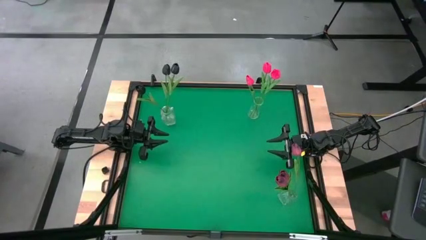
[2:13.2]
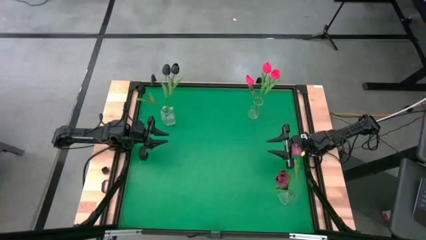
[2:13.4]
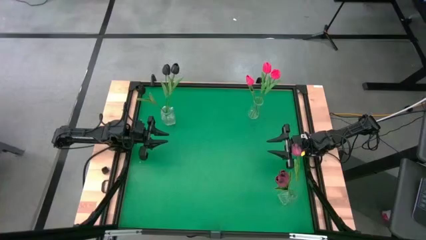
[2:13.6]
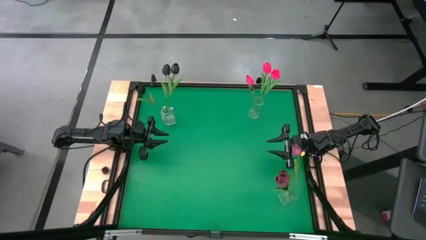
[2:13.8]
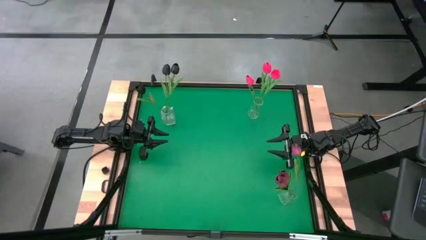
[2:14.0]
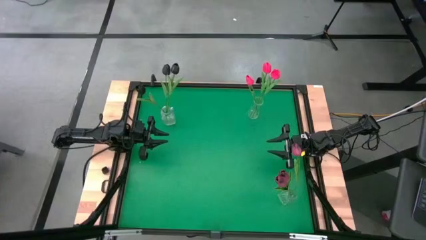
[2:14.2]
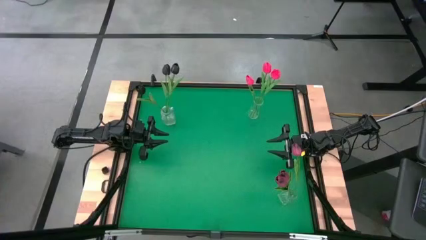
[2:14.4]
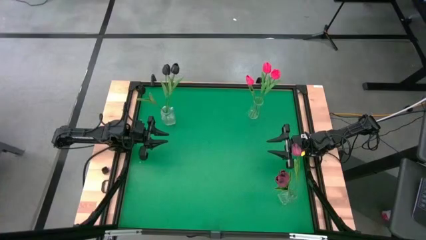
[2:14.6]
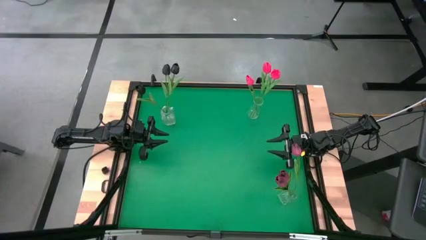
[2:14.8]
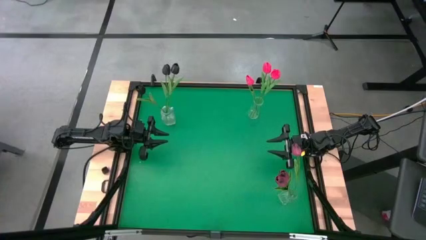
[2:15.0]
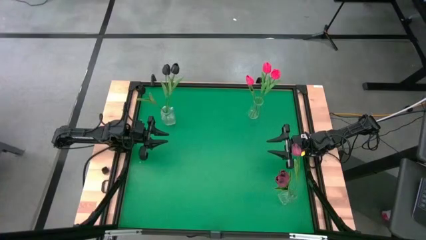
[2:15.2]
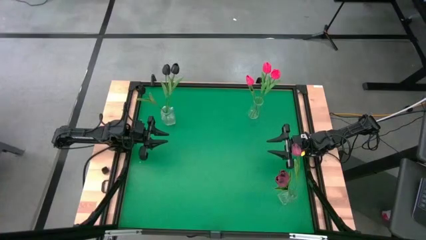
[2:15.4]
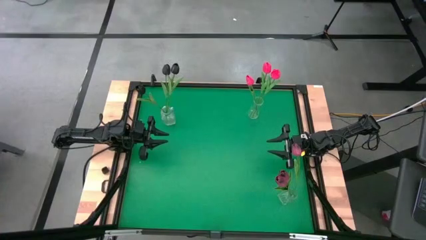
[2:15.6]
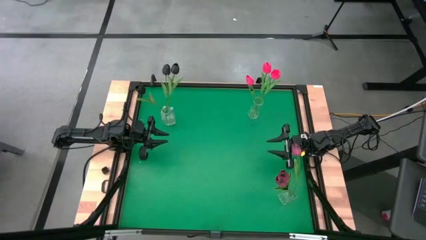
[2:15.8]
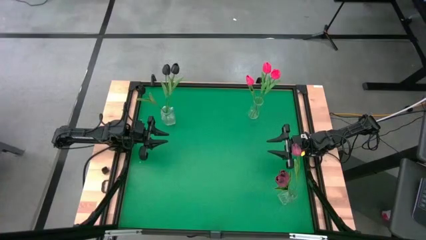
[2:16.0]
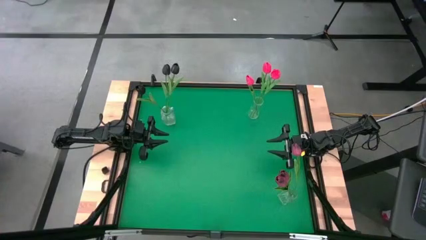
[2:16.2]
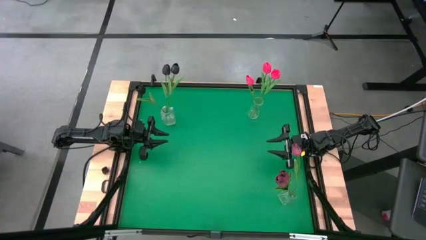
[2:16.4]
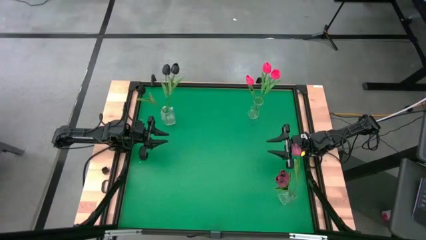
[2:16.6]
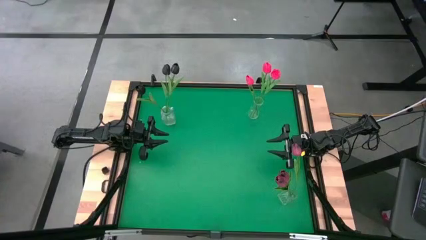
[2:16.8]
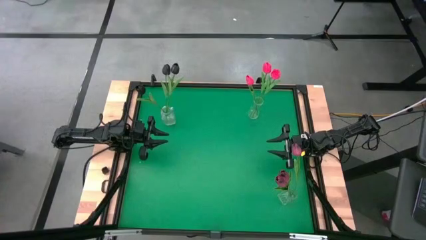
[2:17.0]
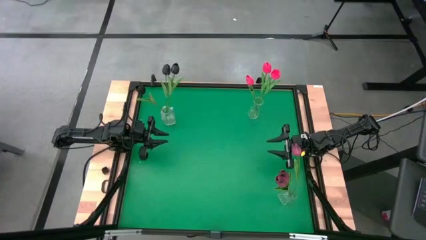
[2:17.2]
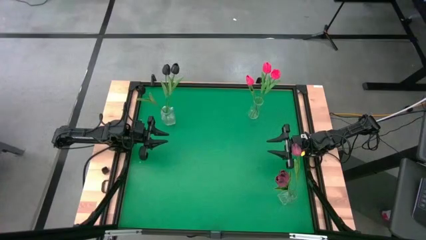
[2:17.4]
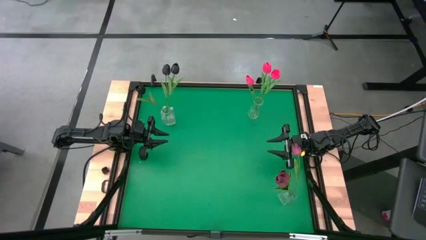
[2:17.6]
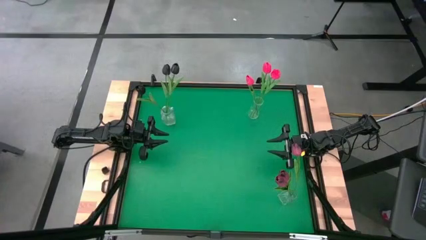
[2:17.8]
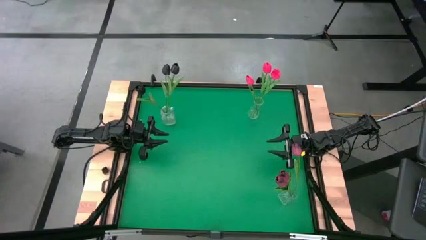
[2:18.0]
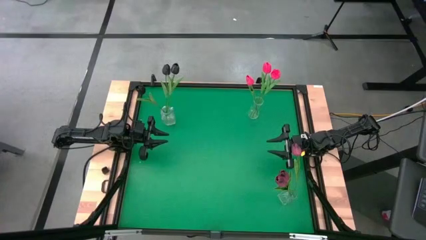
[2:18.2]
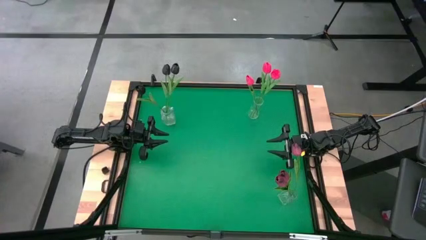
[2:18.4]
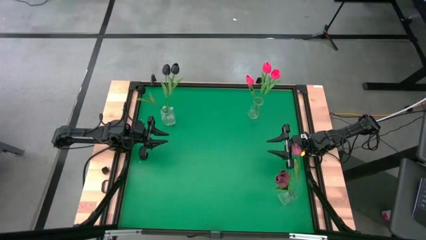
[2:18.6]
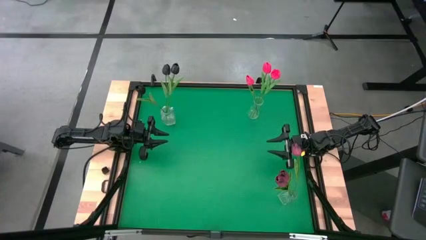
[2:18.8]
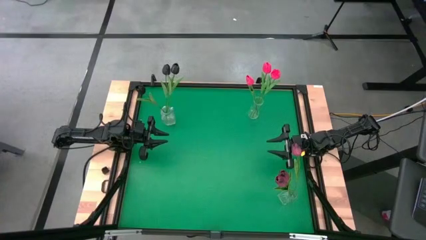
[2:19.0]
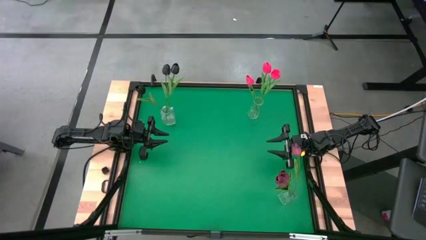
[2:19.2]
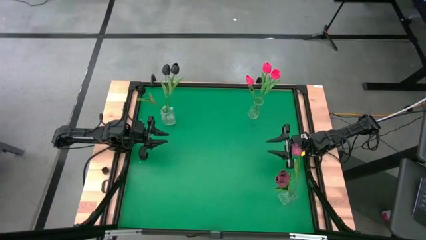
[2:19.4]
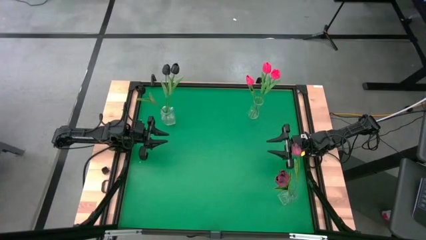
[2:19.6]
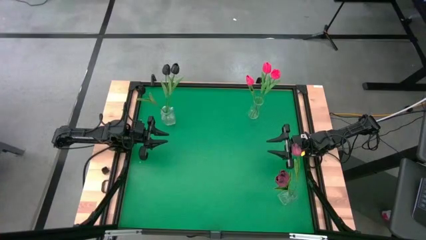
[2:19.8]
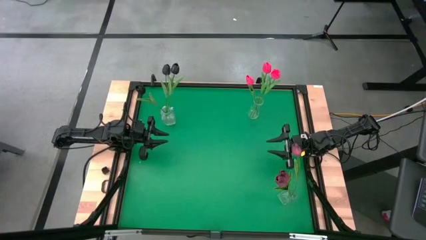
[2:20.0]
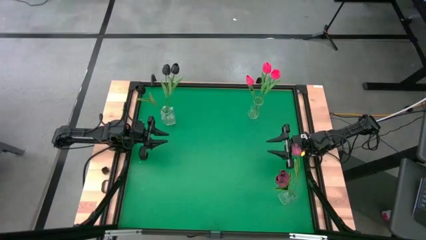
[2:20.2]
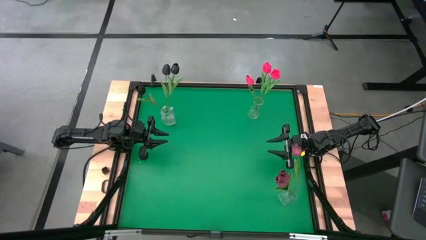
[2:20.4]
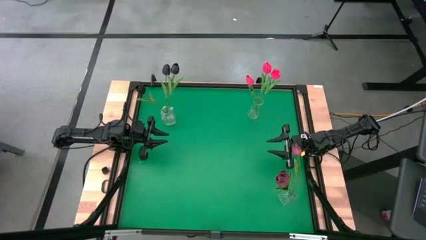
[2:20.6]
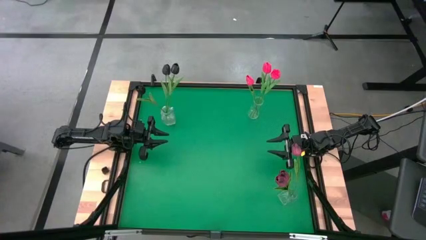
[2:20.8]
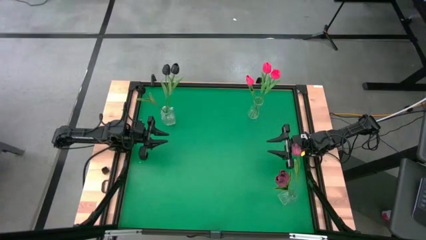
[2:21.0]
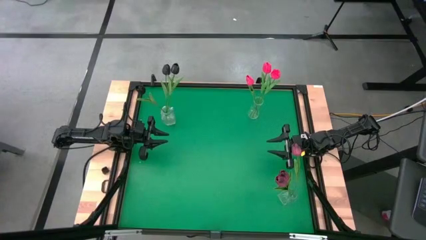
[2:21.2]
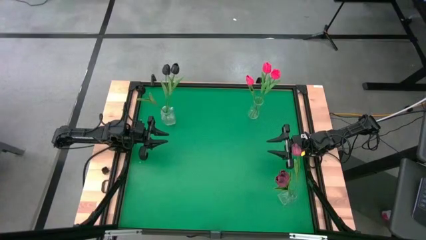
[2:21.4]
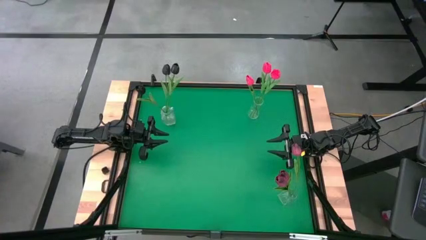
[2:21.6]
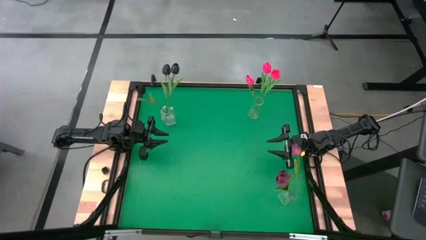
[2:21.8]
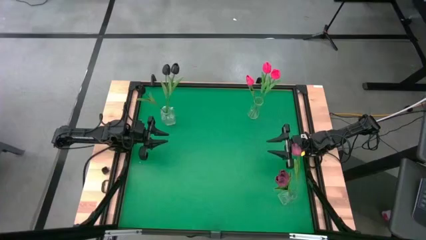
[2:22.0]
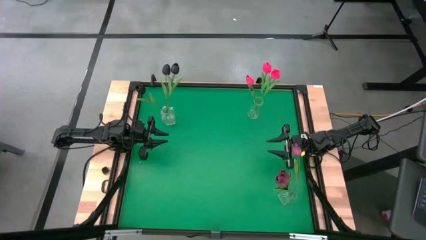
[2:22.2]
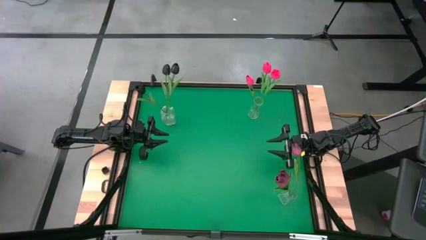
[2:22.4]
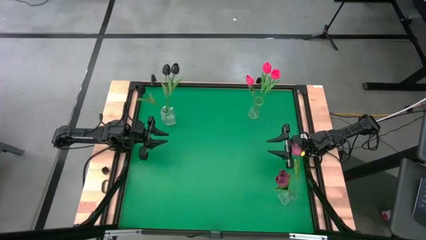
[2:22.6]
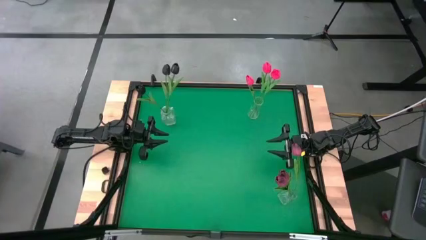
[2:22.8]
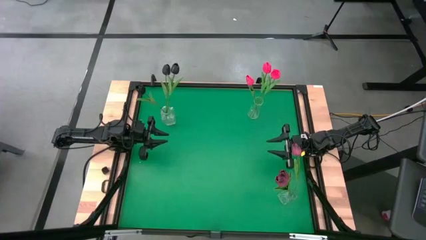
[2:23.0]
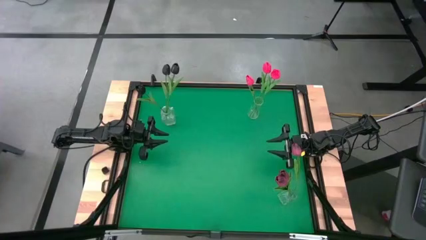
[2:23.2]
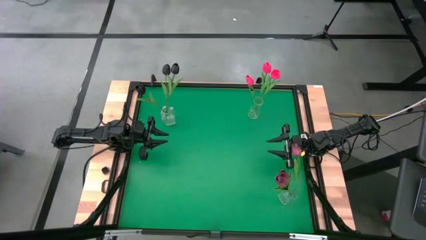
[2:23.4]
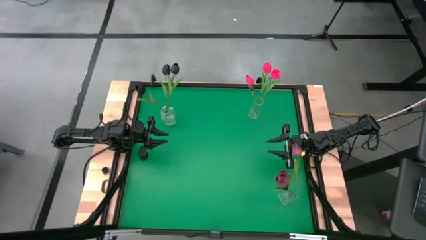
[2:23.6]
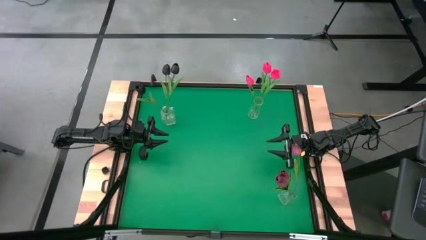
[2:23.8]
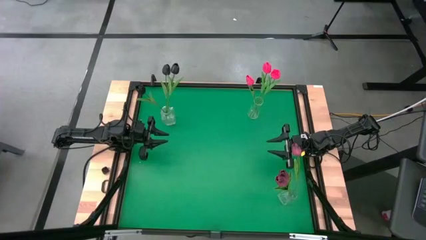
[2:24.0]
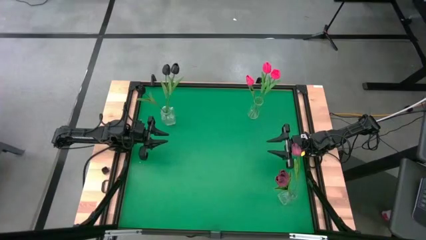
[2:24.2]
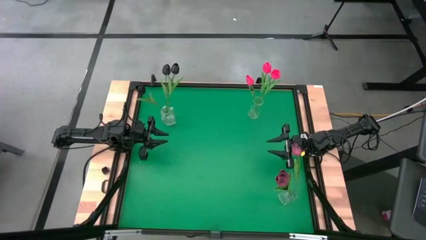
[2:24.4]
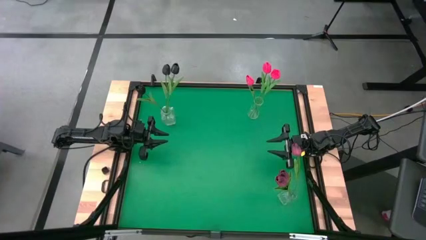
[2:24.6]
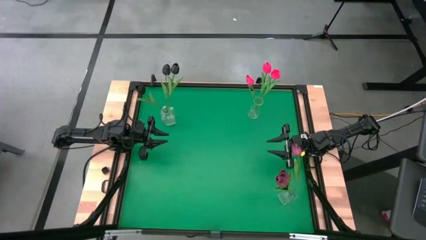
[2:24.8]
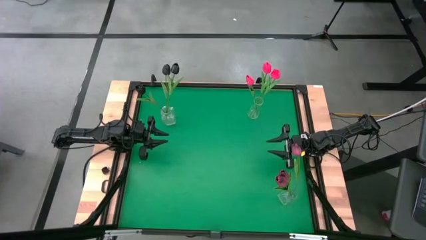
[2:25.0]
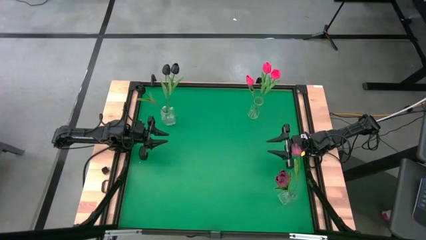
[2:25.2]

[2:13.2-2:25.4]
Task: Sort flowers into vase by color
Return to Home Position

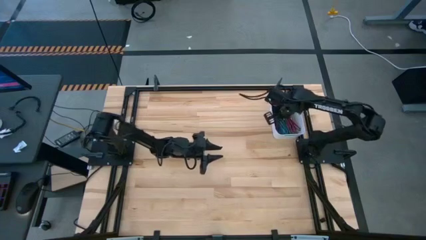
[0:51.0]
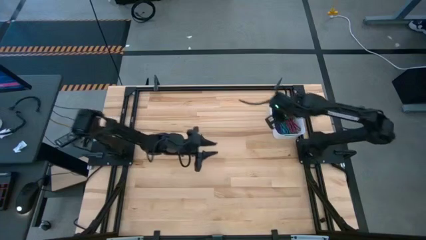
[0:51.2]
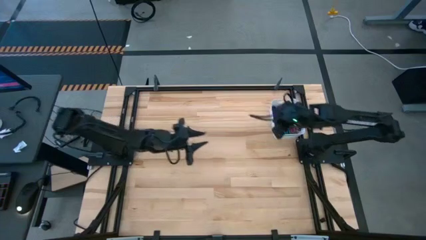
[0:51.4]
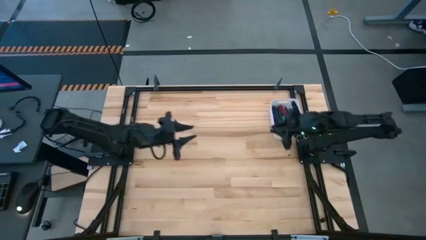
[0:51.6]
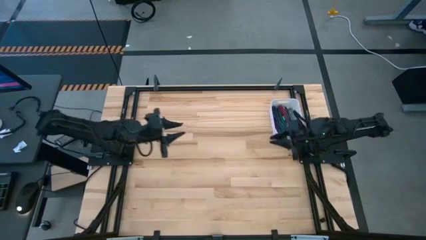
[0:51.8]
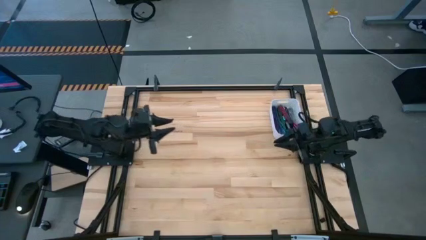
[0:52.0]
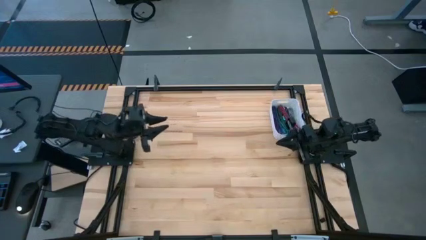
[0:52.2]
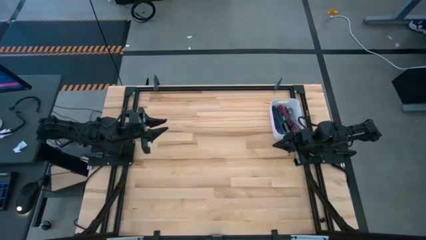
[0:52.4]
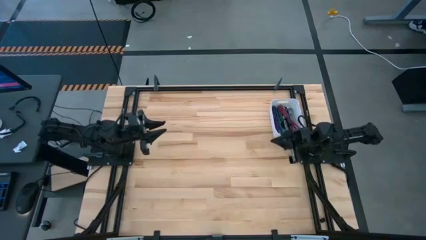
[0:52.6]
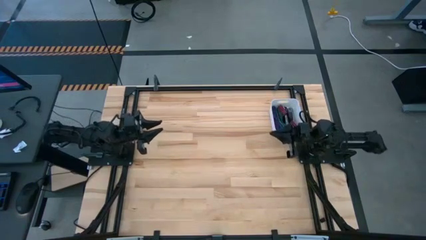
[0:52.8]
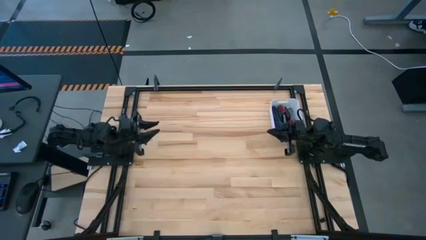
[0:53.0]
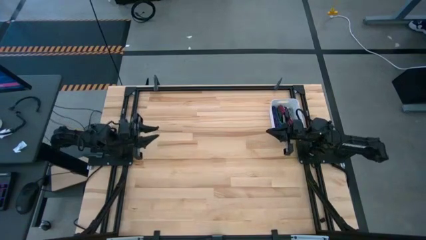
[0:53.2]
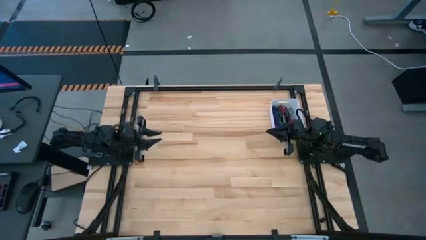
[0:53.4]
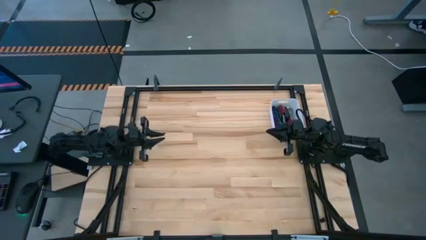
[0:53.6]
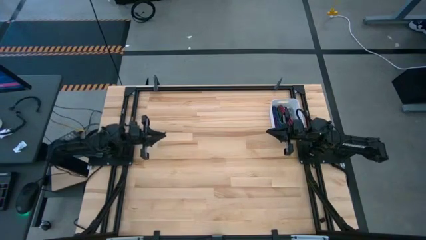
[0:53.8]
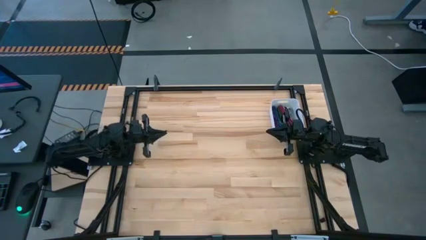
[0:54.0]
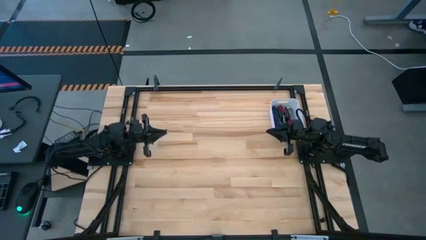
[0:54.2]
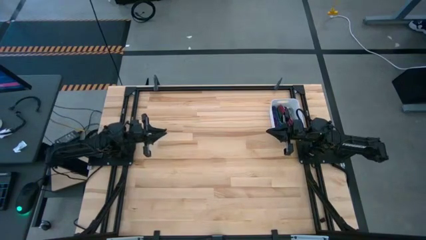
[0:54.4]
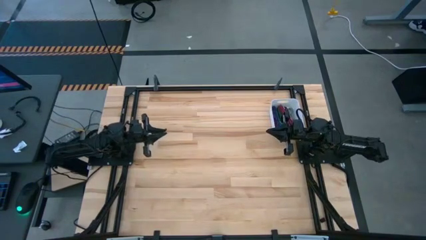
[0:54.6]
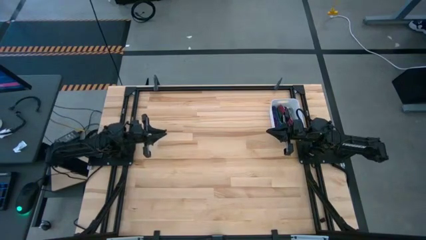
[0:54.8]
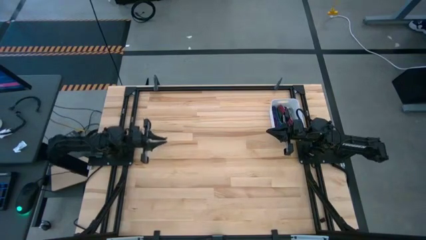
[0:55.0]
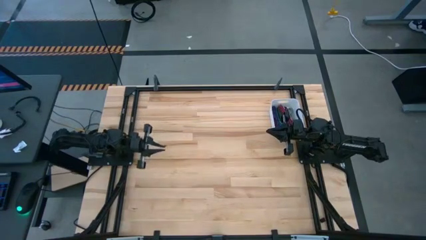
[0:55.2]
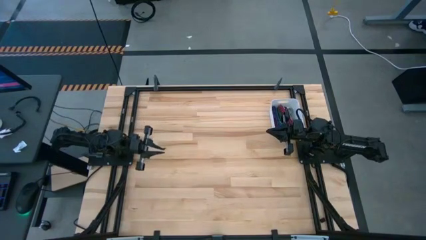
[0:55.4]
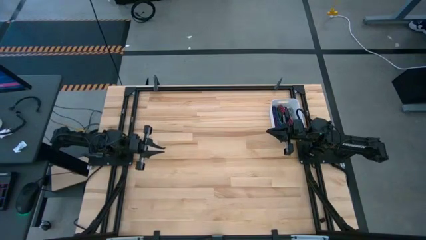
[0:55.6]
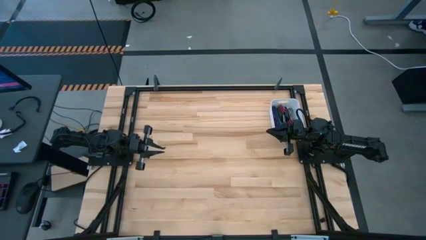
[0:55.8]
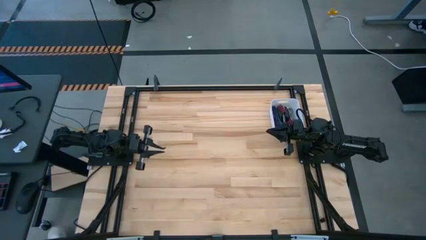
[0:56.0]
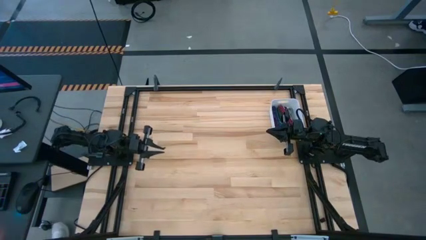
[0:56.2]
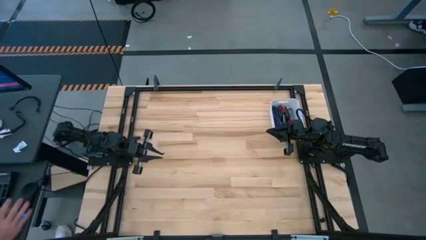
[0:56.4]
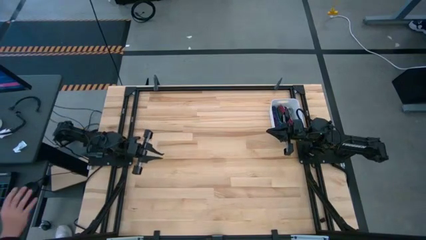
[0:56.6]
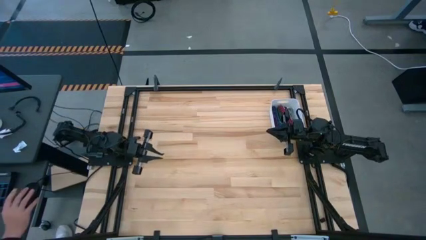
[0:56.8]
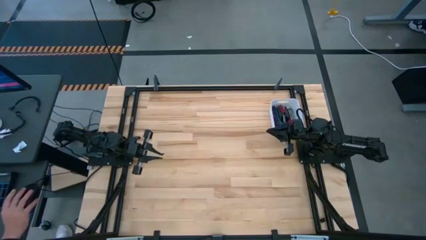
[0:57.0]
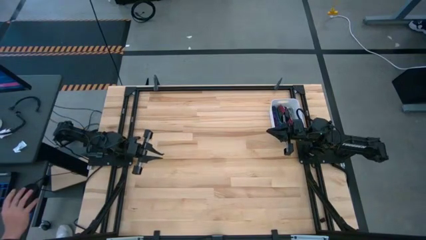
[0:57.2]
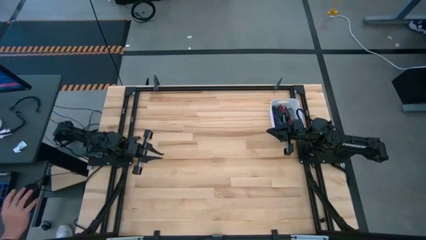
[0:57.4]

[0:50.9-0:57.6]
Task: Pick and place USB-C Cables
Return to Home Position
